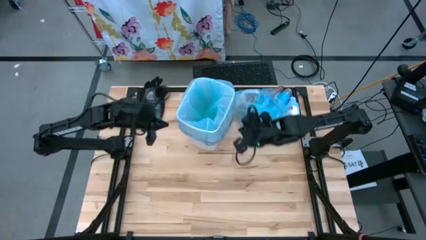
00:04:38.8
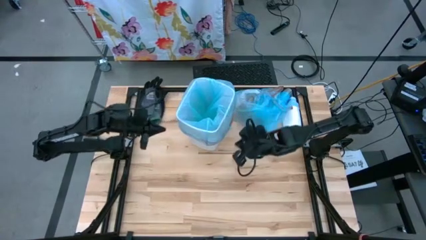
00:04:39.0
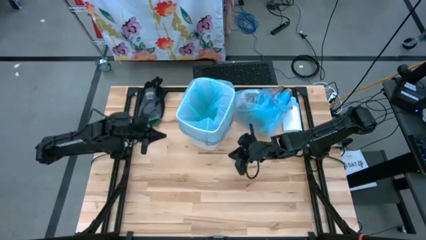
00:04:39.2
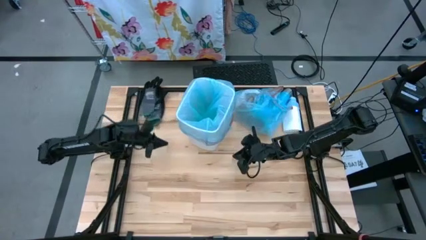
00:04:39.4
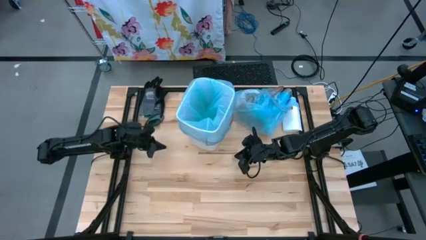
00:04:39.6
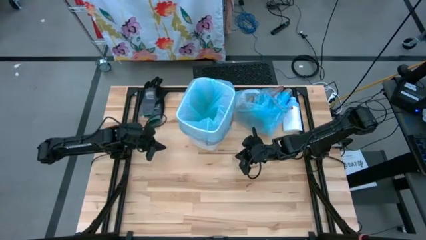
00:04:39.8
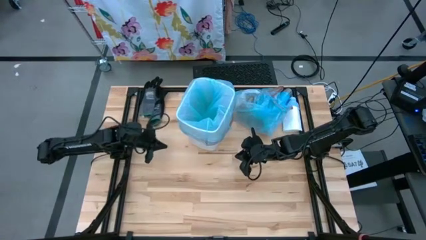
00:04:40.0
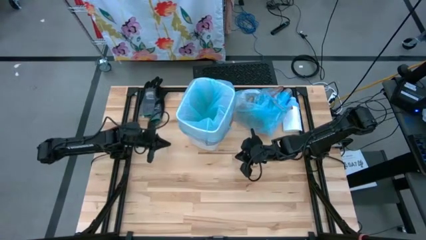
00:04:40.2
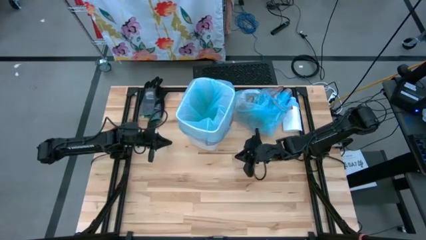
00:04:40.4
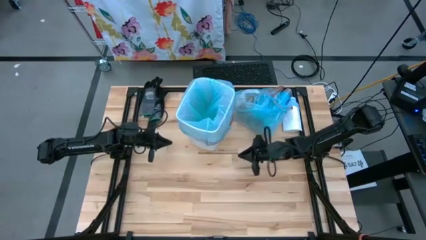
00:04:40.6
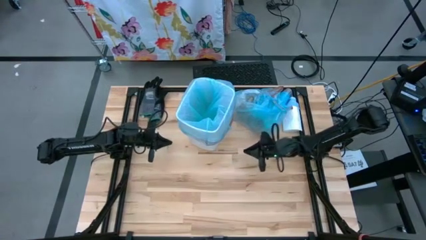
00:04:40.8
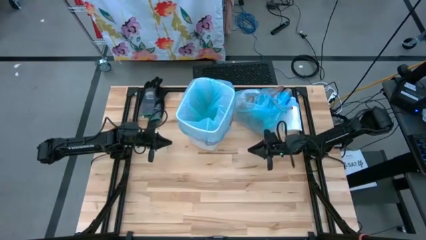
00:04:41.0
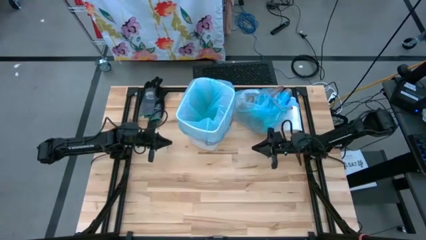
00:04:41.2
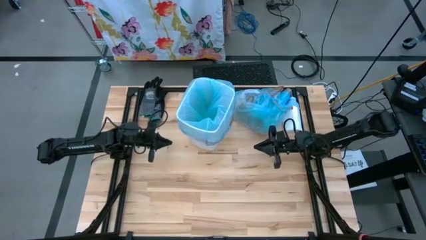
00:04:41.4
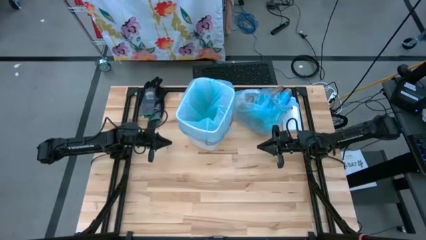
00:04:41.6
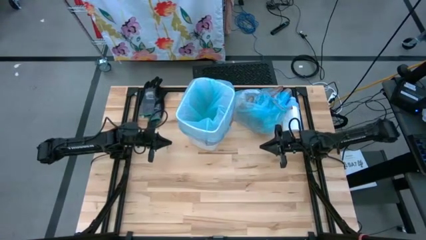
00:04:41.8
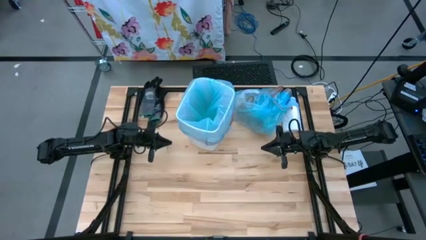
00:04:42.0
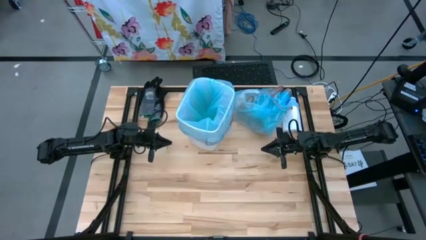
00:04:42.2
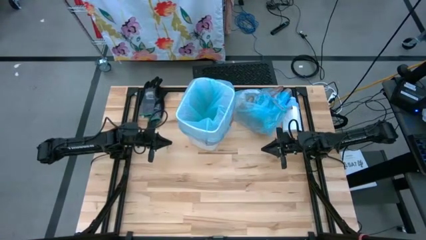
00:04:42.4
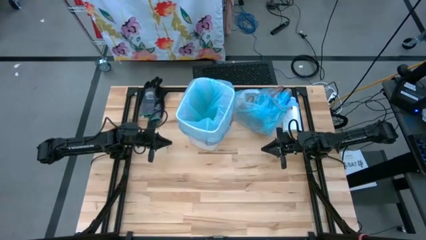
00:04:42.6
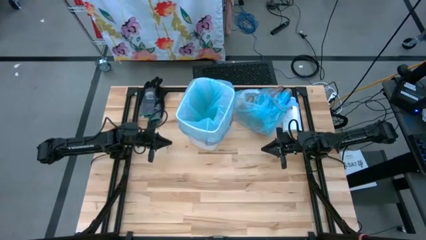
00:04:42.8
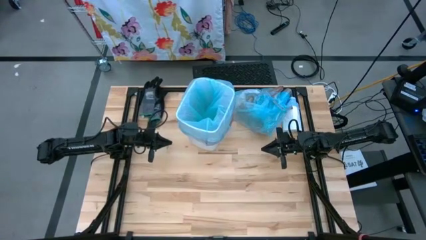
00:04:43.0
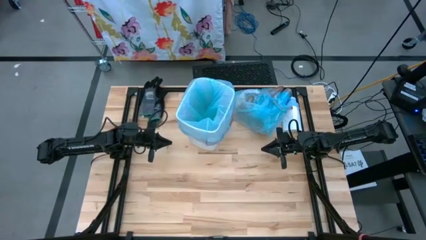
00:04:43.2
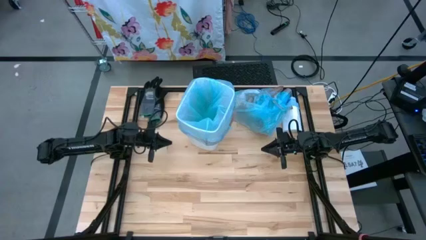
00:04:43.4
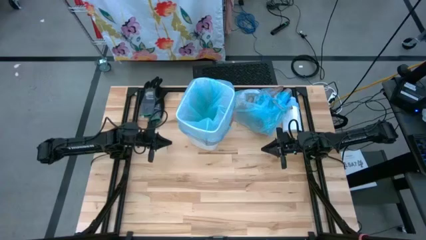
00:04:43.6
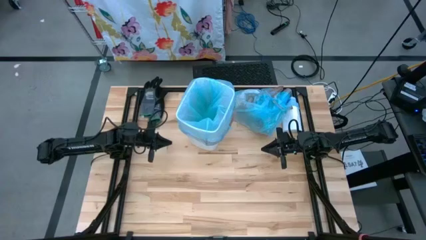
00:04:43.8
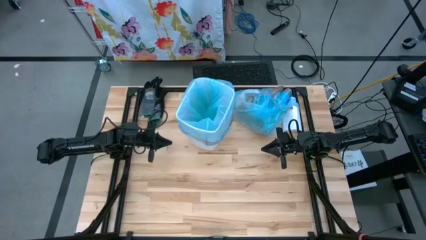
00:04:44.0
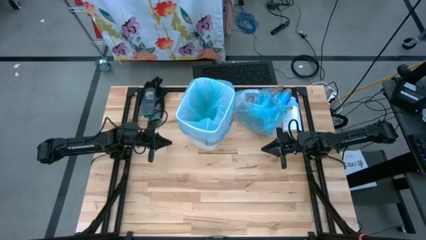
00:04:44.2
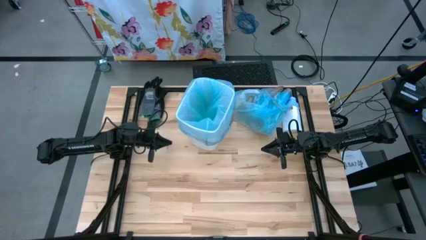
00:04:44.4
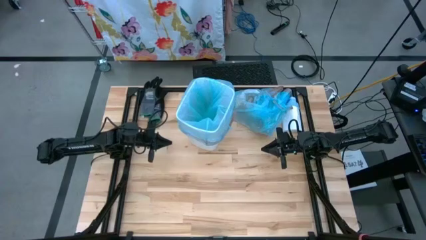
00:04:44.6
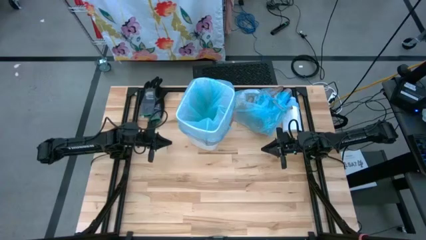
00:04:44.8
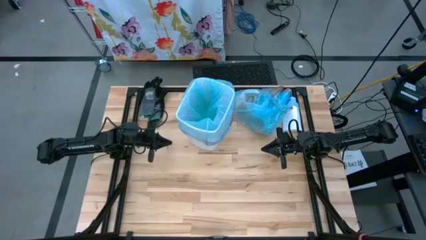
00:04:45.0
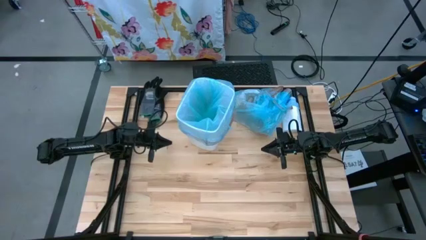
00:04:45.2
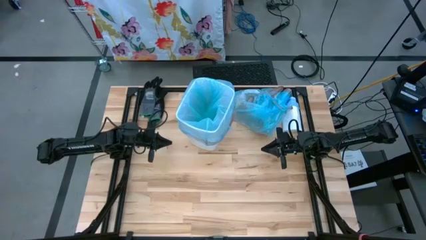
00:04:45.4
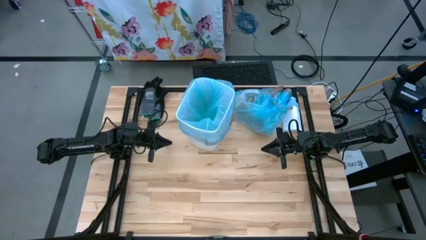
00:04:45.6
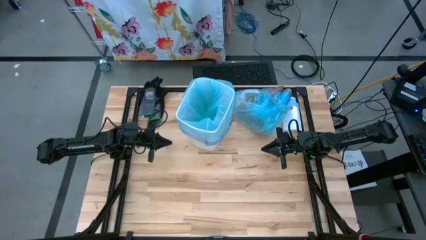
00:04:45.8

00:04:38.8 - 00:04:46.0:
Task: place trash/remove bag and relplace
Return to Home Position

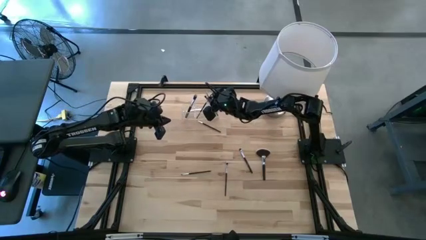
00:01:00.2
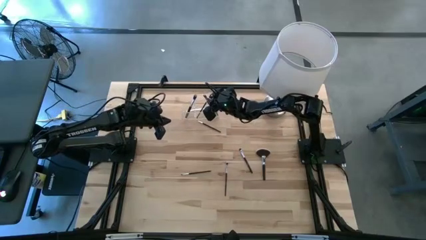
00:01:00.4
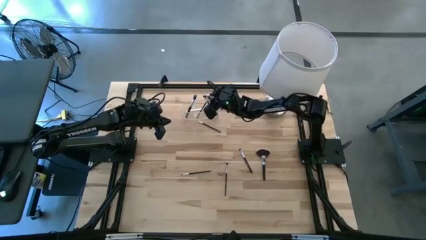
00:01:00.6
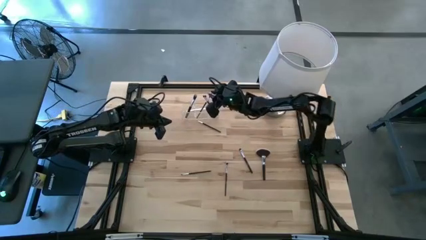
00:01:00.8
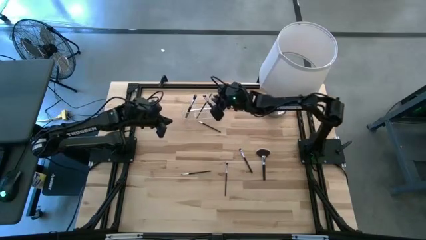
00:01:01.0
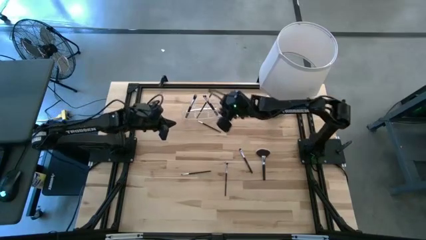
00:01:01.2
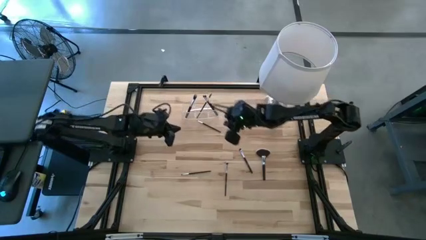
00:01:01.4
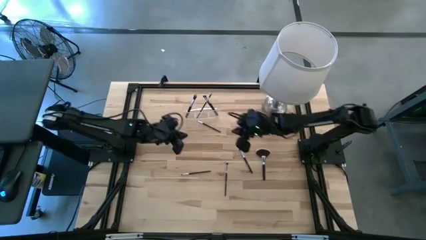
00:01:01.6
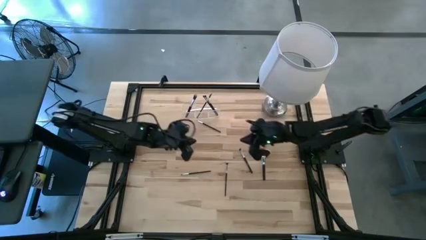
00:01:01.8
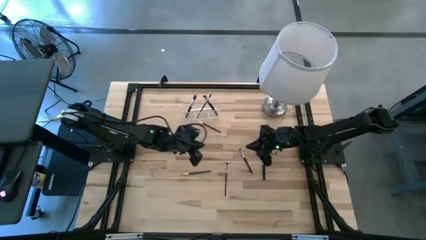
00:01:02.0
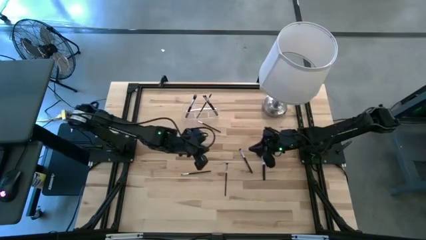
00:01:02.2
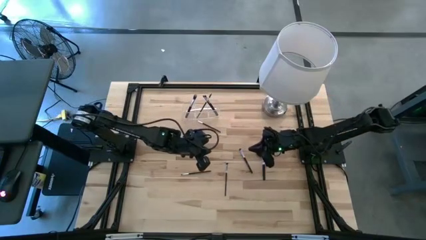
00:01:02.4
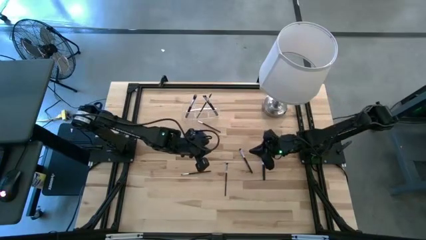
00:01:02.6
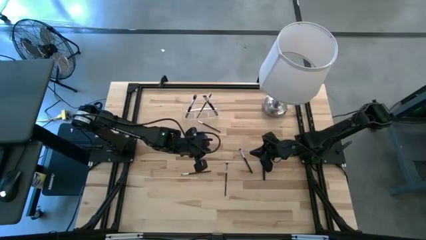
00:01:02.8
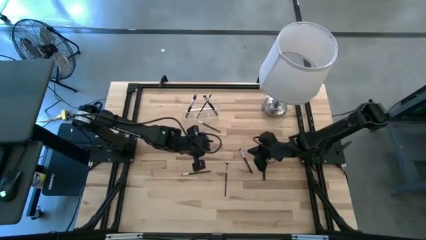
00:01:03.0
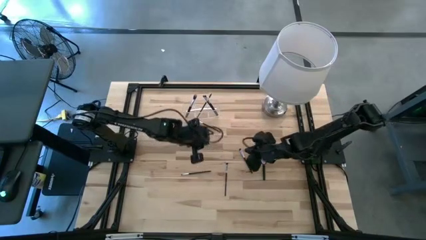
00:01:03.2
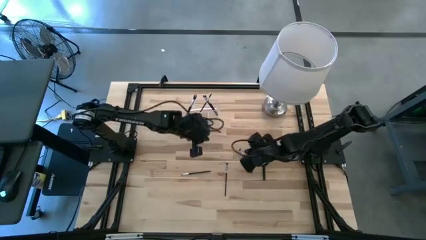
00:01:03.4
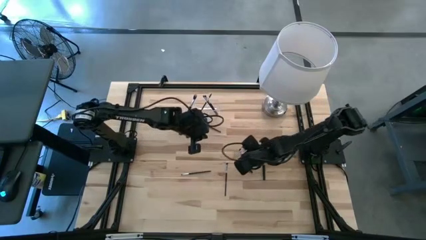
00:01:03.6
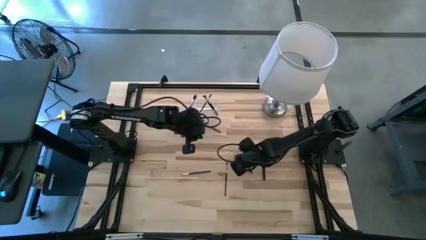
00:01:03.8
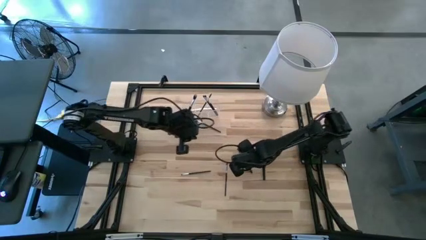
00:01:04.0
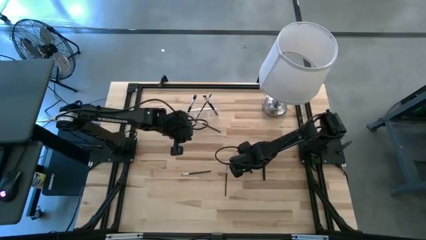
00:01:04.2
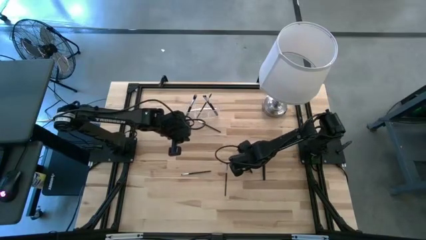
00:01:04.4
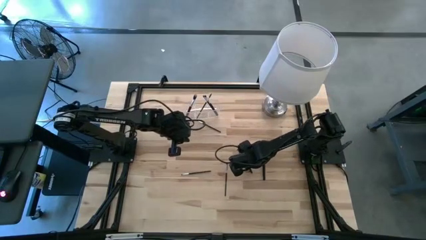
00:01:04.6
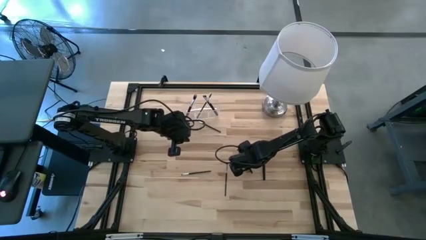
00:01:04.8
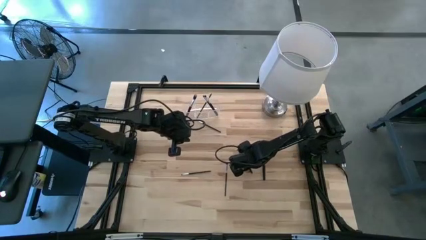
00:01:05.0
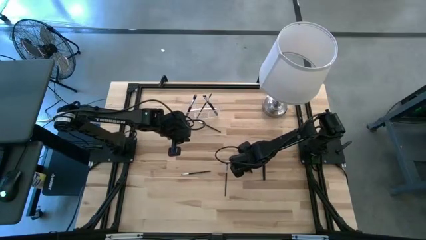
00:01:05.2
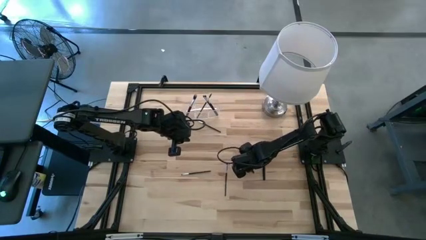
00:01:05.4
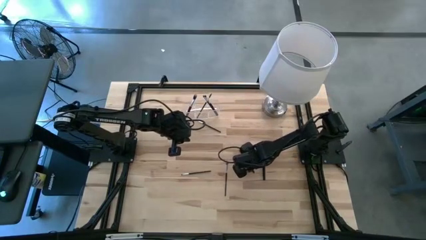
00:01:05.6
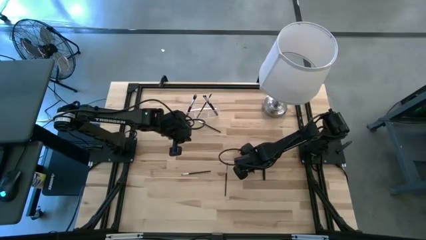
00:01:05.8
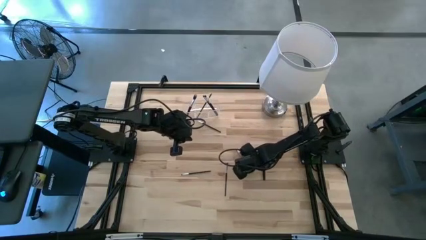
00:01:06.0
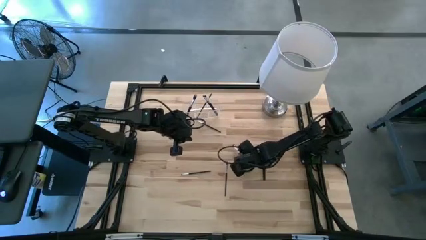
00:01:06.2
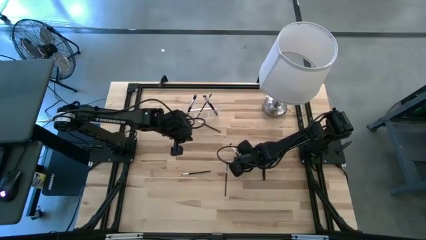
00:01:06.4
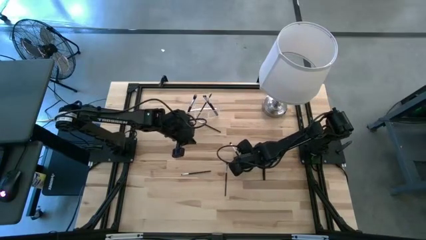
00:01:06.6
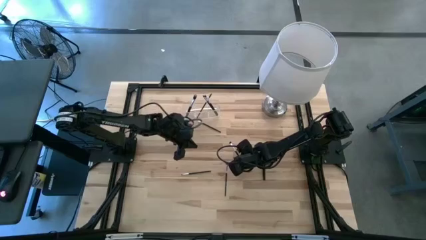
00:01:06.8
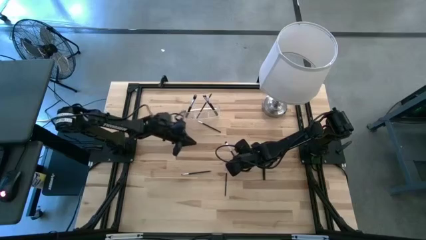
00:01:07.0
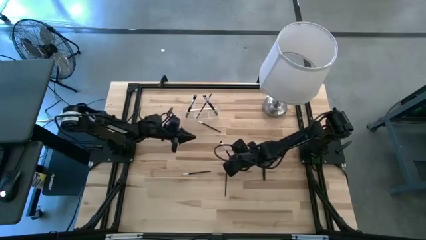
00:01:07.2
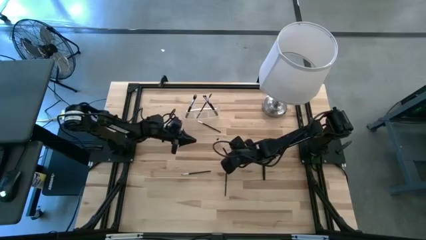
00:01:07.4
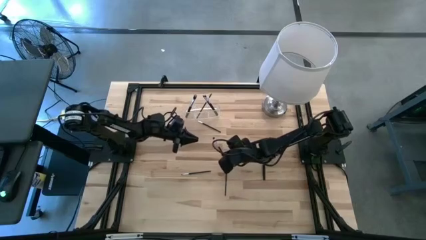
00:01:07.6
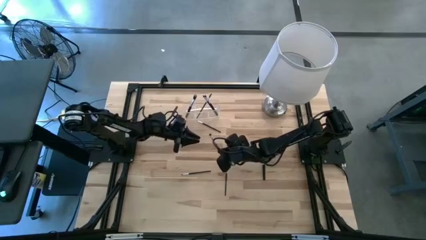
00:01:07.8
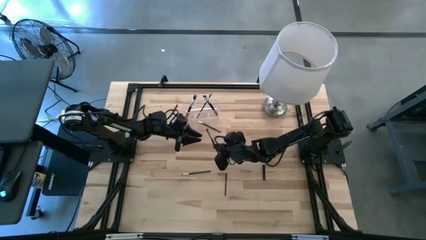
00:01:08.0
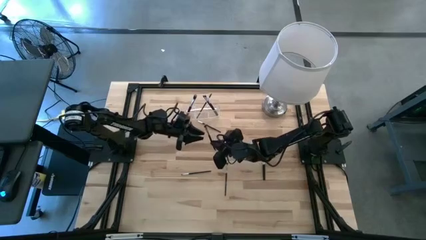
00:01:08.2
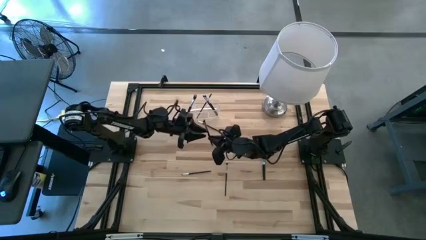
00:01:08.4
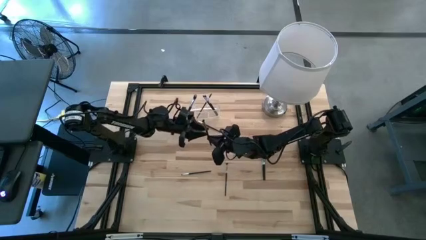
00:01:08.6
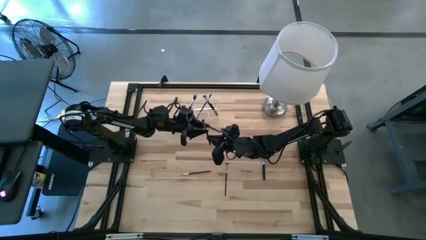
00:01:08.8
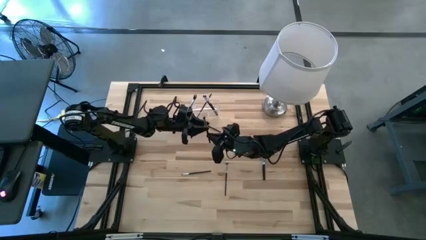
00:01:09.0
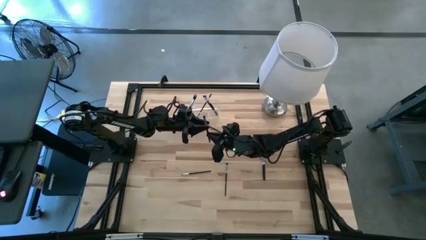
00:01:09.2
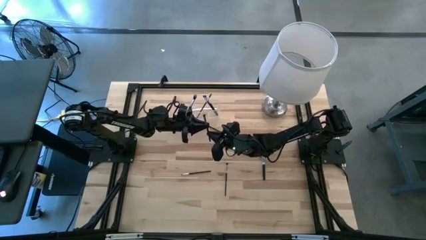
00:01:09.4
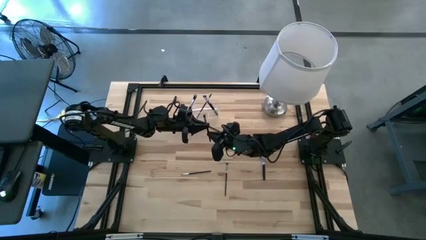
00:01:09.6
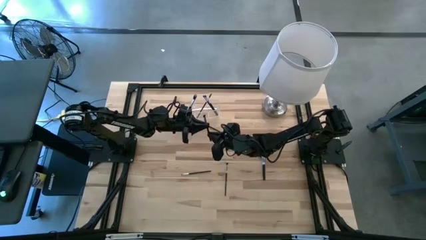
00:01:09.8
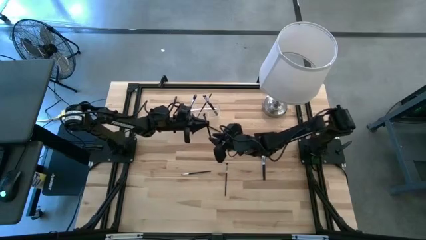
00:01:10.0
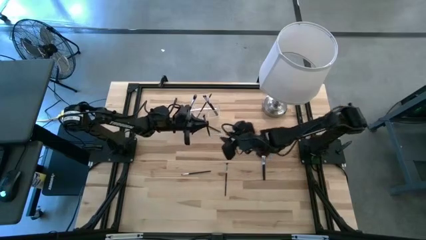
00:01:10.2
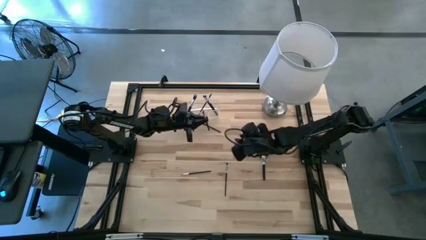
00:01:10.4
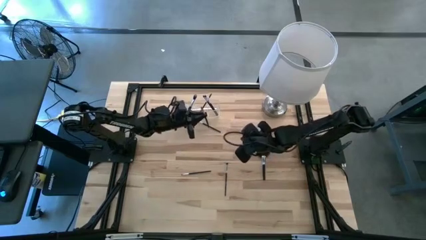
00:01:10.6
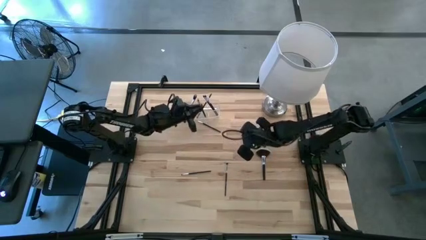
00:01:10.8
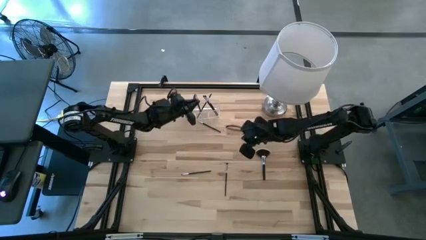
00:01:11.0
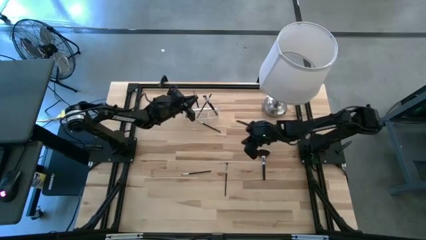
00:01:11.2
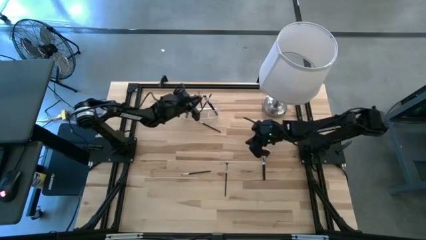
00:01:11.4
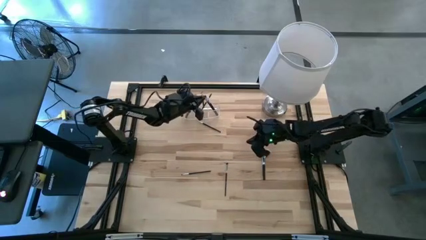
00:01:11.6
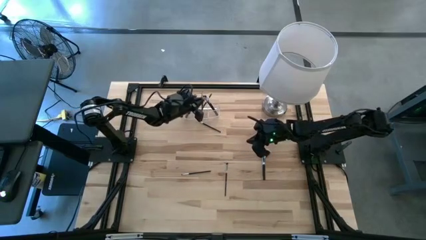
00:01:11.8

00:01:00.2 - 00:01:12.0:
Task: Put items in baskets/containers
Put the foundation brush into the transparent organizer
